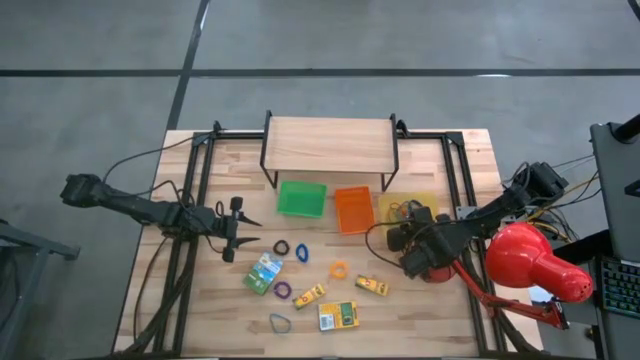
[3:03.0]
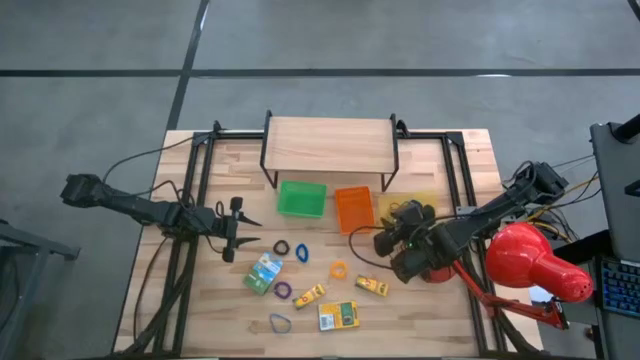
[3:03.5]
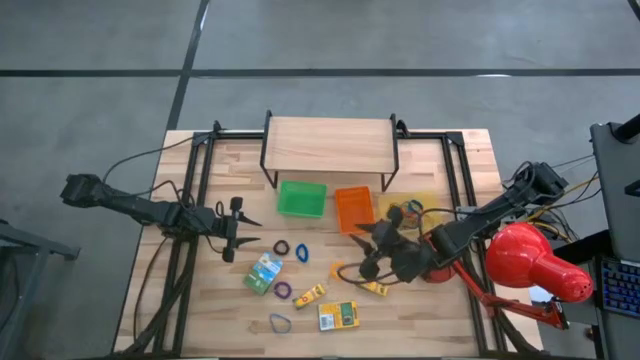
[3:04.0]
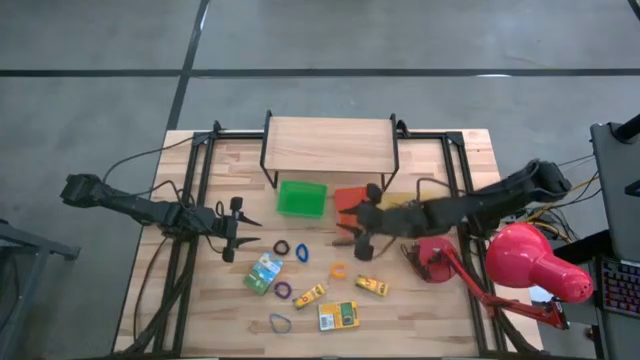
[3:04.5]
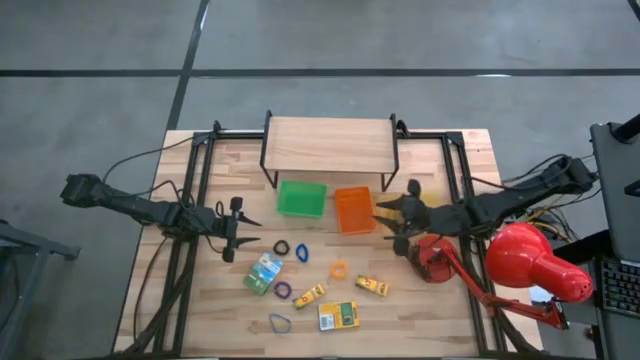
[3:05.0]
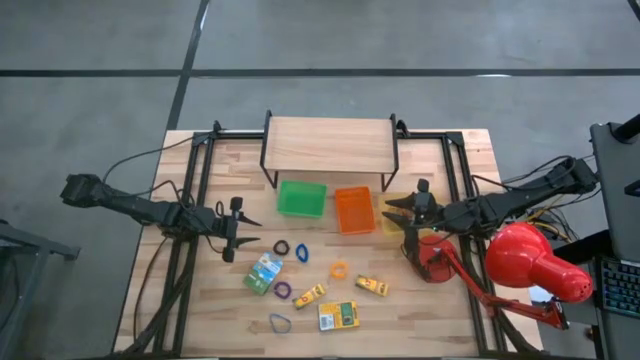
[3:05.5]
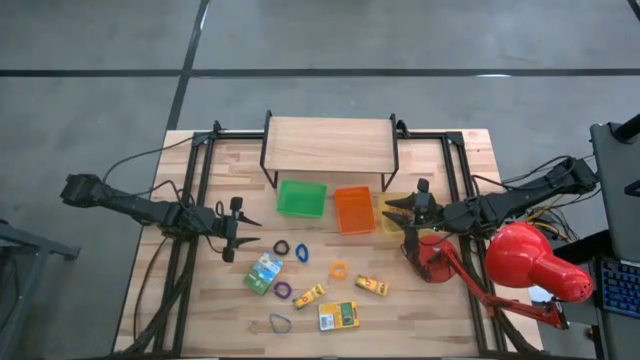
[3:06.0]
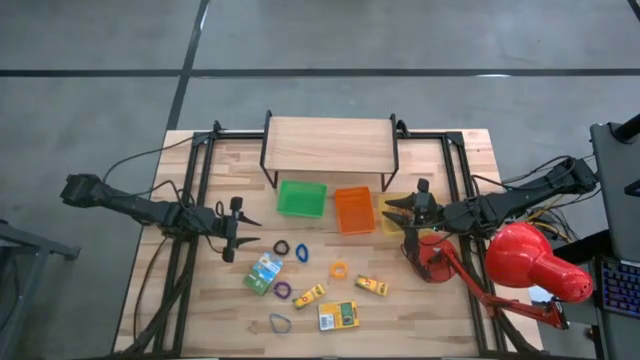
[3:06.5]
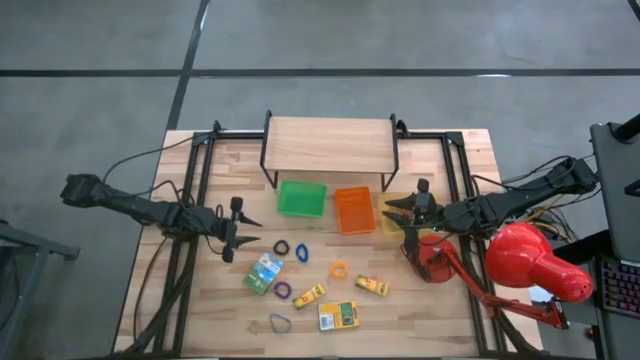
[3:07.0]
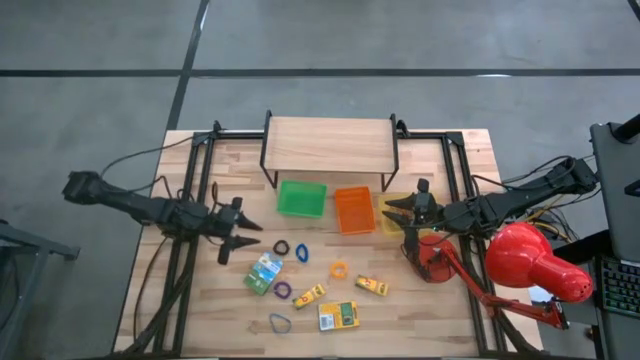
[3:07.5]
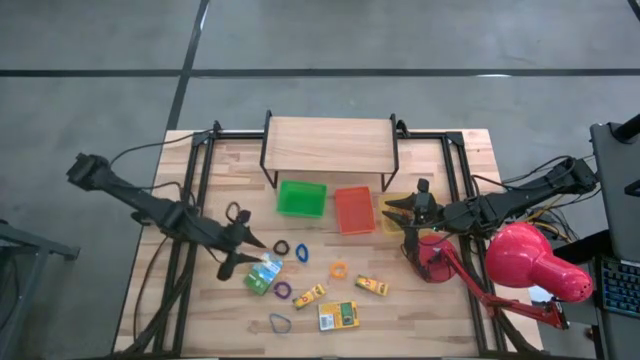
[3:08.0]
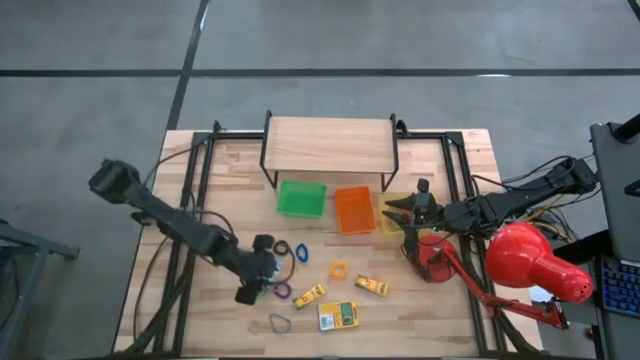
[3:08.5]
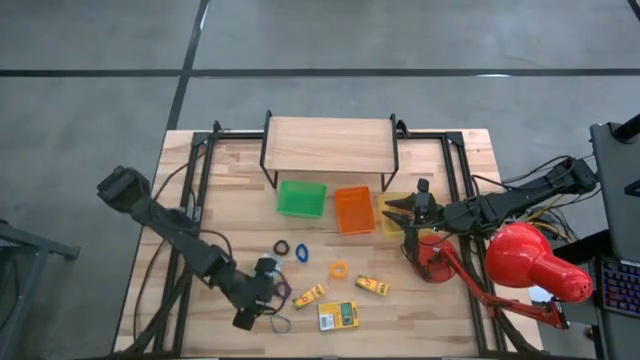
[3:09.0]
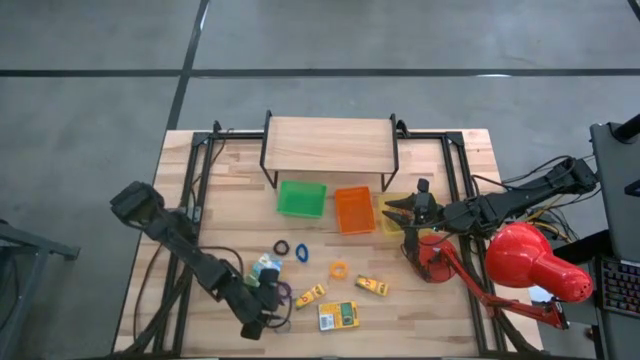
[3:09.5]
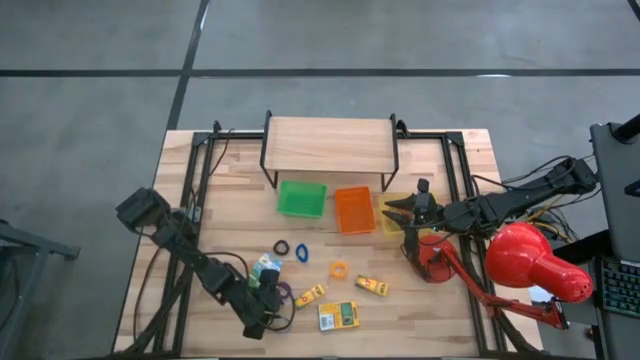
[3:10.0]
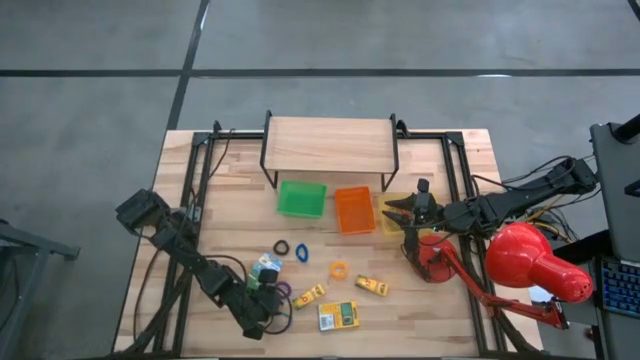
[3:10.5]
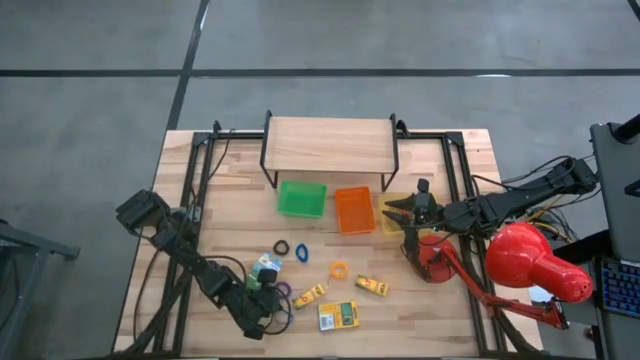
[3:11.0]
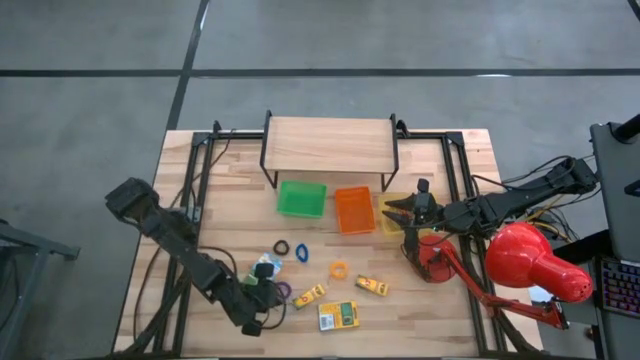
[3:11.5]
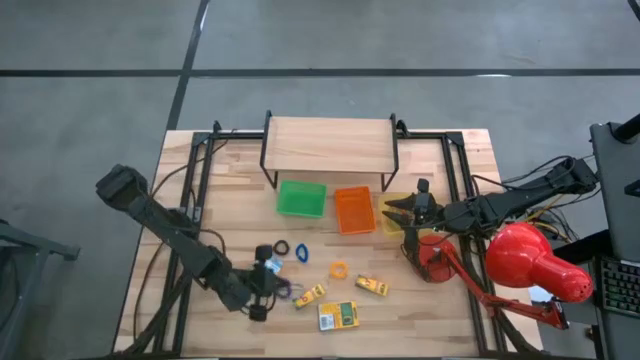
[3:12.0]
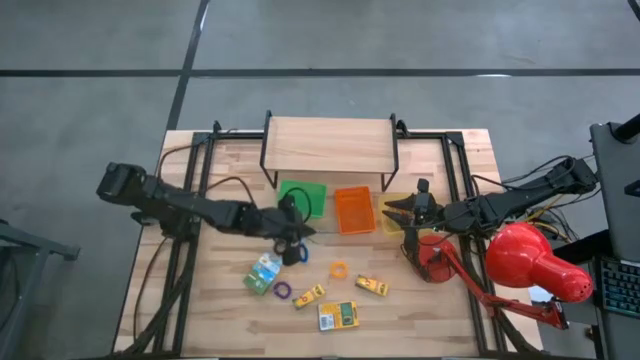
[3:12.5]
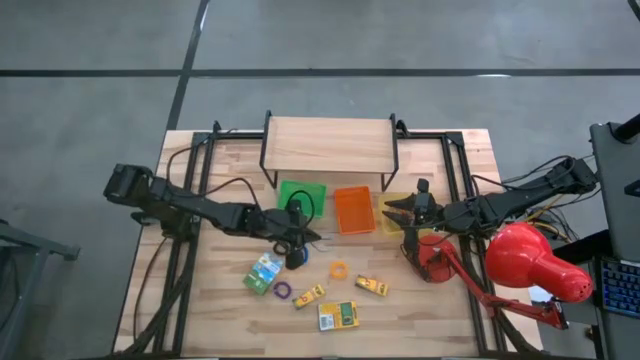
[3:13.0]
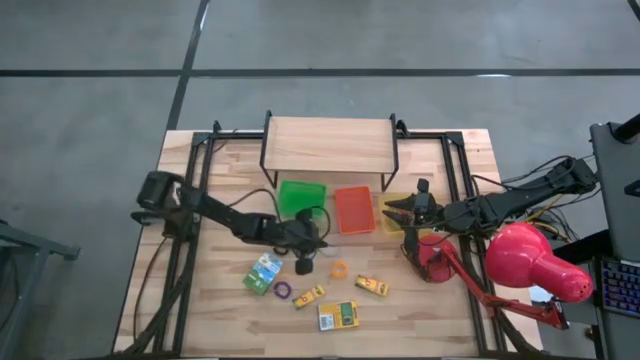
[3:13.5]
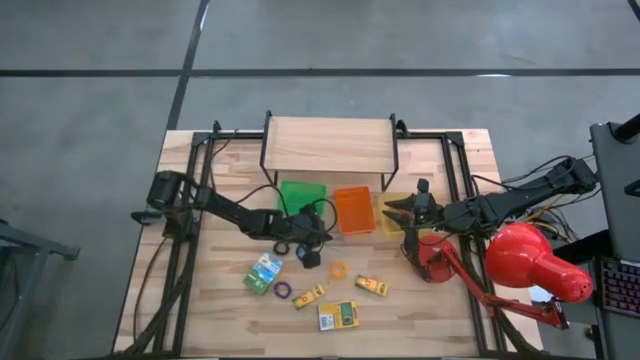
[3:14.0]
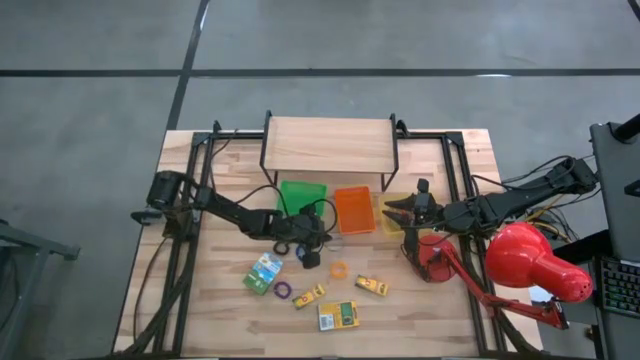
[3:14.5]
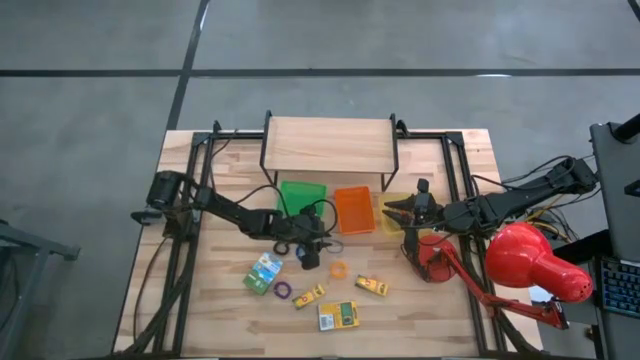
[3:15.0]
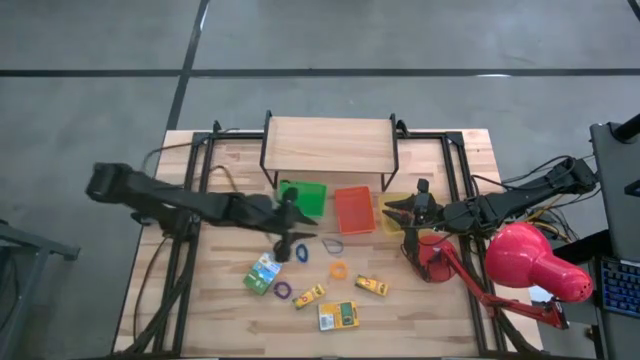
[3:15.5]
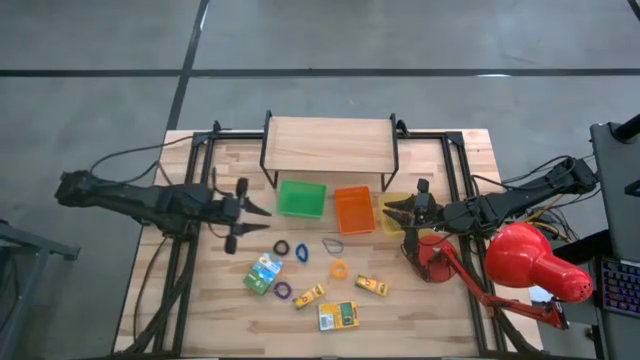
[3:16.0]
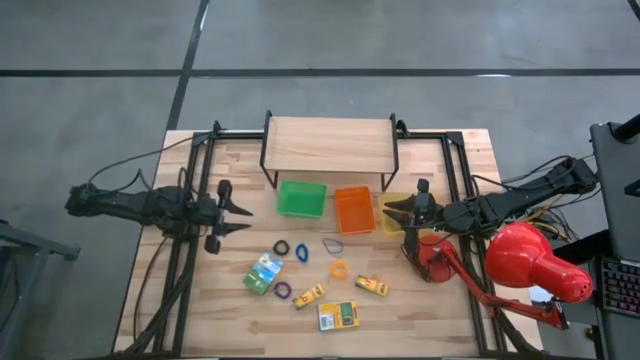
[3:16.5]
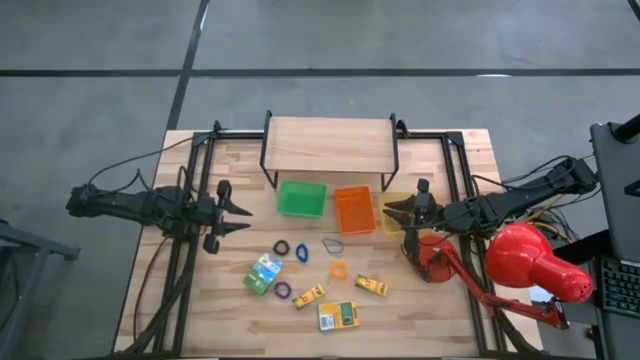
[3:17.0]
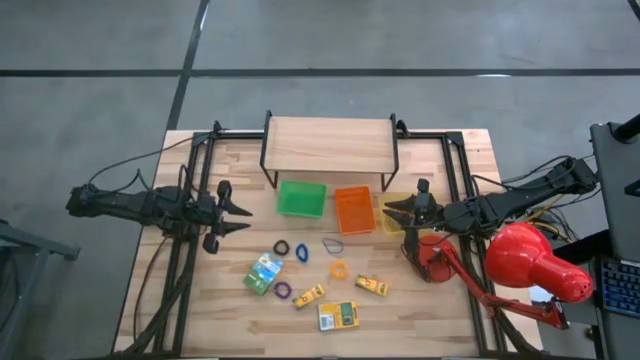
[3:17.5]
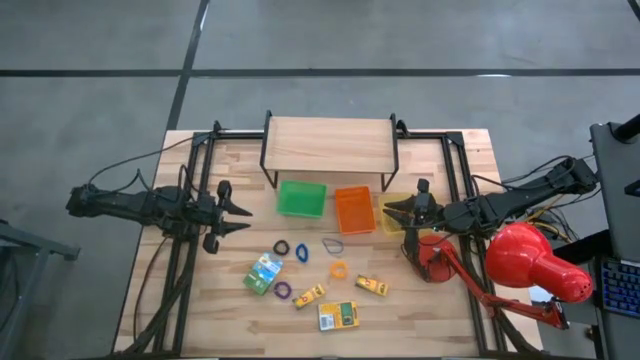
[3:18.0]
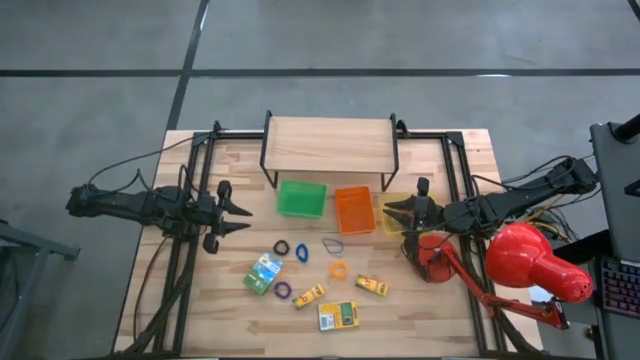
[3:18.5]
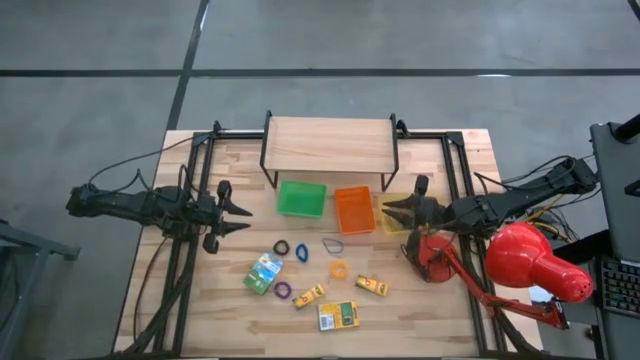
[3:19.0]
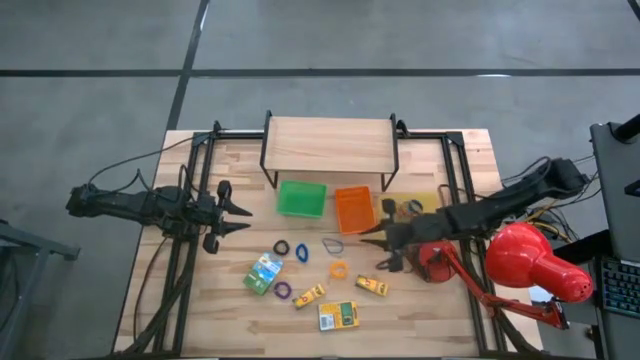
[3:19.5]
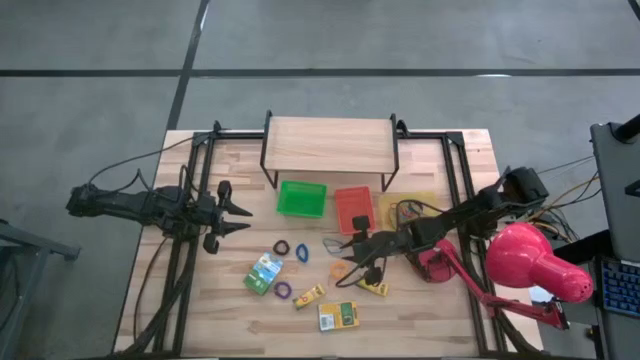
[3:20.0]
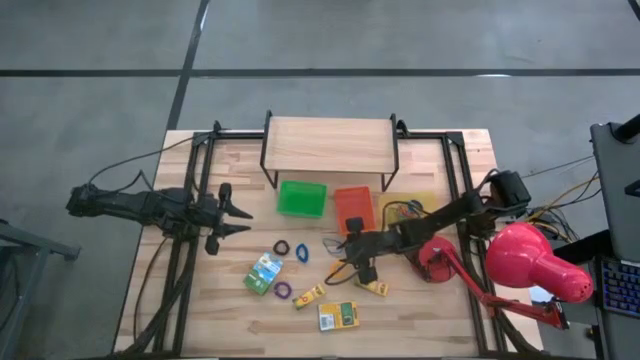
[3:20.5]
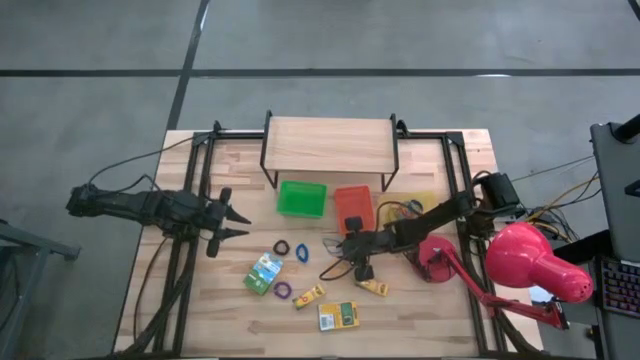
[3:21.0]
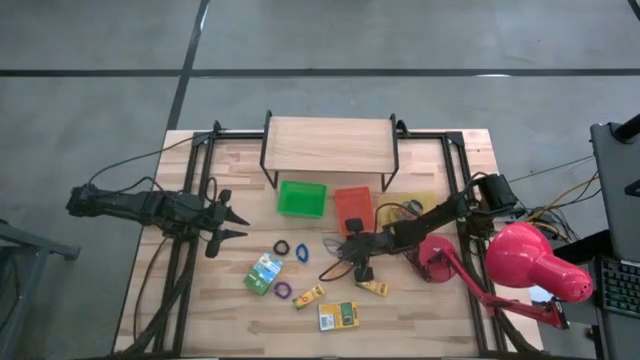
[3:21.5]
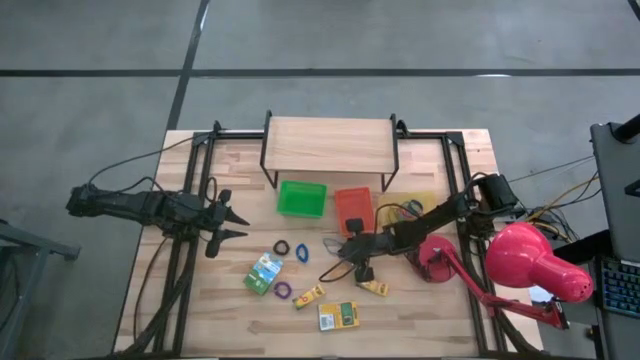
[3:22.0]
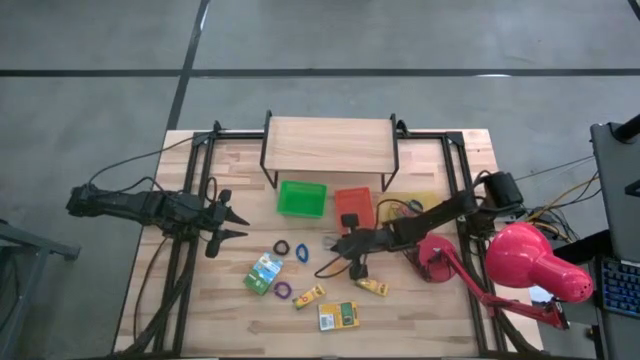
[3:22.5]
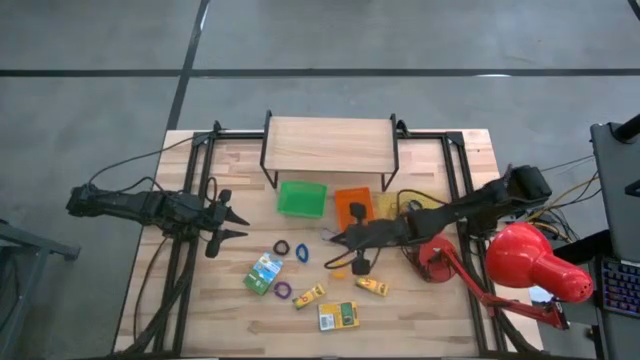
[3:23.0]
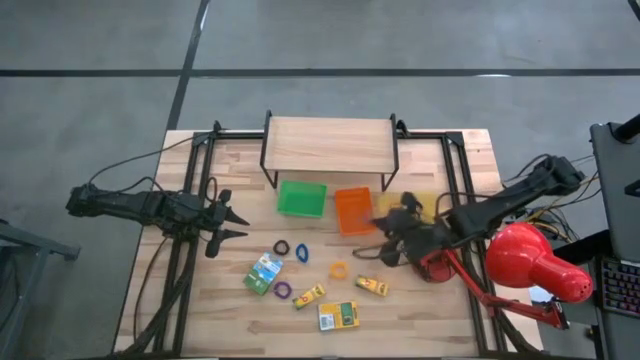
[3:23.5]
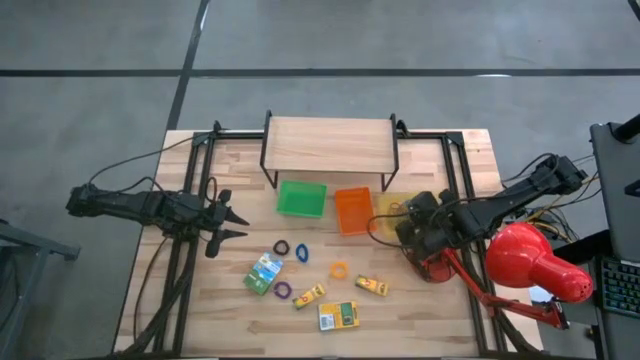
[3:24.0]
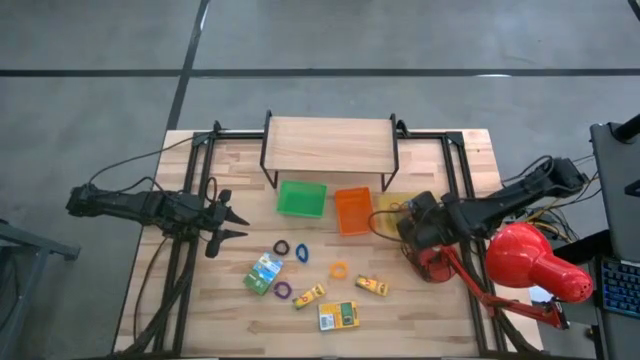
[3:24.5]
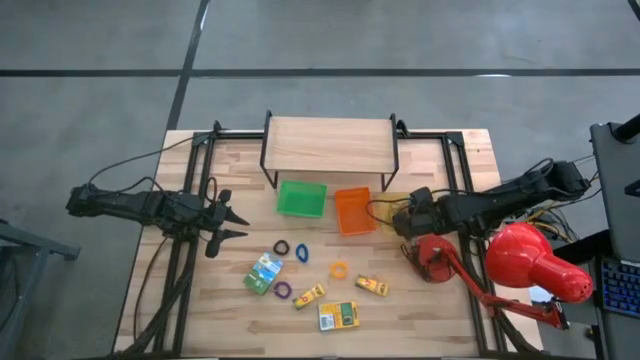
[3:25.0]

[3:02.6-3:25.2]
Task: Pick & Place Office Desk Supplies
Put the blue rubber band into the yellow bin
